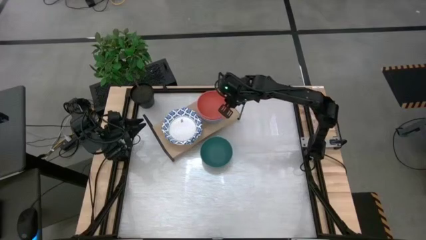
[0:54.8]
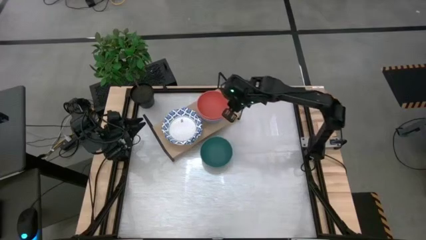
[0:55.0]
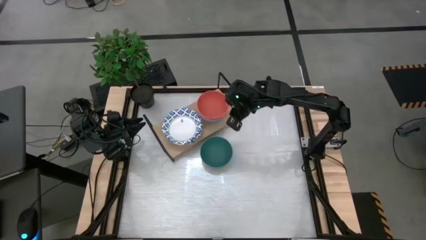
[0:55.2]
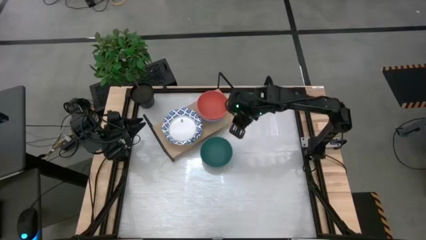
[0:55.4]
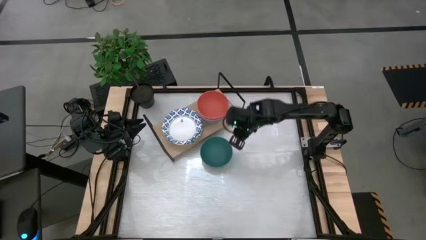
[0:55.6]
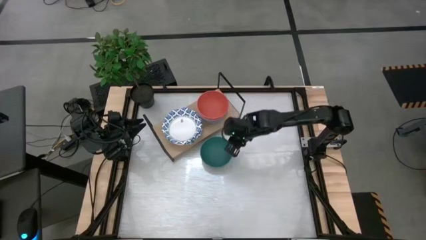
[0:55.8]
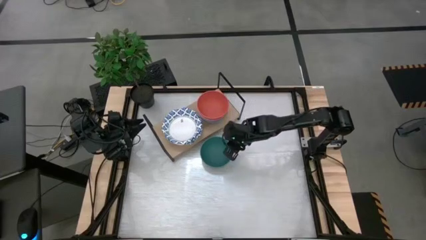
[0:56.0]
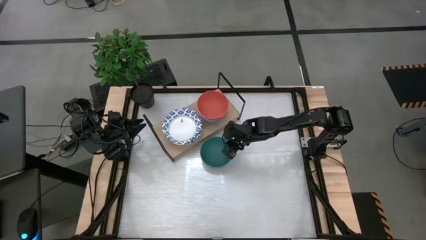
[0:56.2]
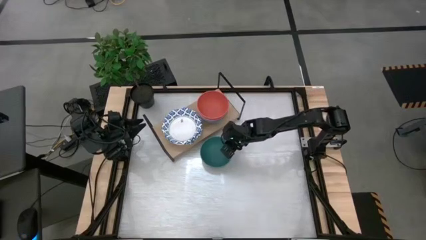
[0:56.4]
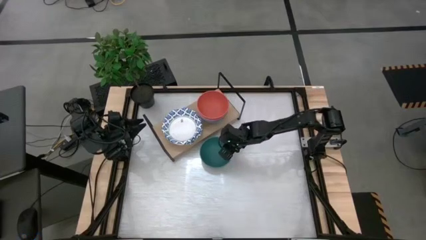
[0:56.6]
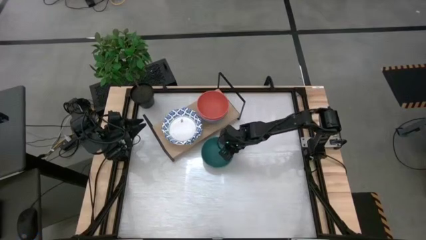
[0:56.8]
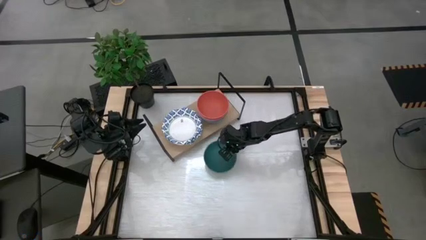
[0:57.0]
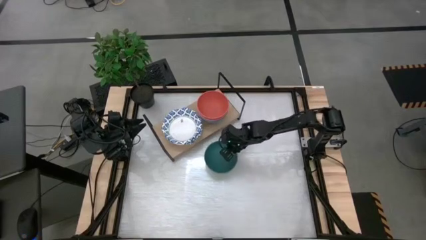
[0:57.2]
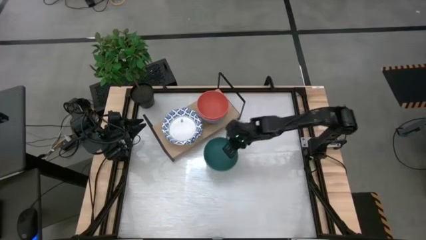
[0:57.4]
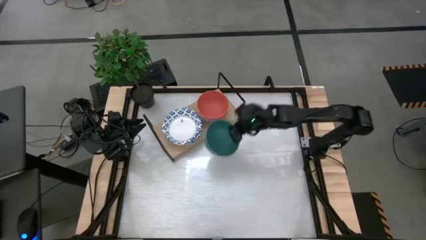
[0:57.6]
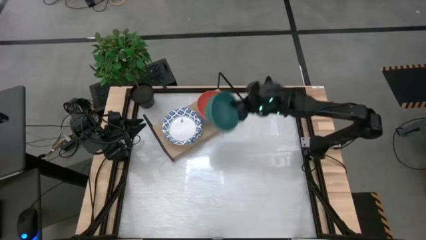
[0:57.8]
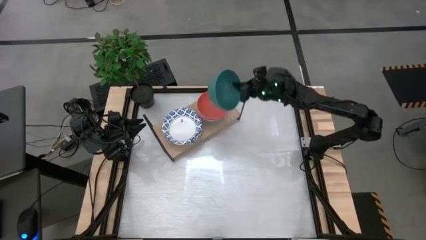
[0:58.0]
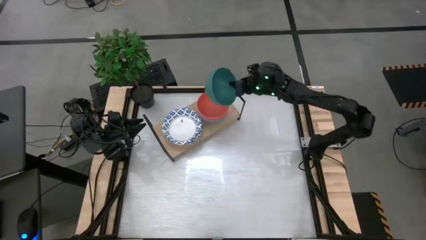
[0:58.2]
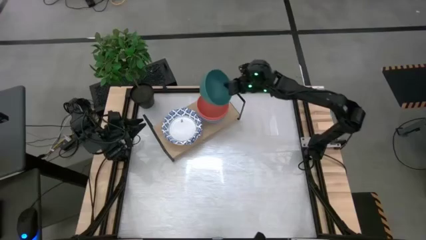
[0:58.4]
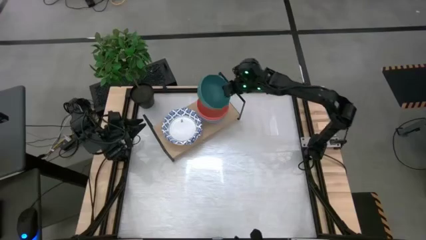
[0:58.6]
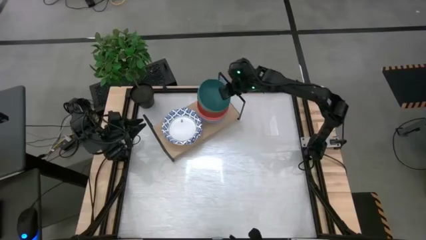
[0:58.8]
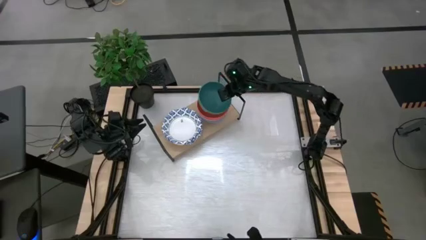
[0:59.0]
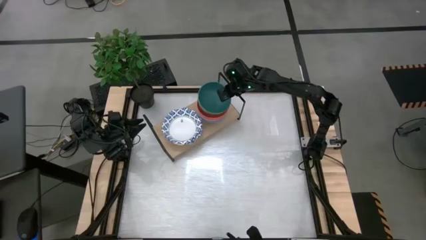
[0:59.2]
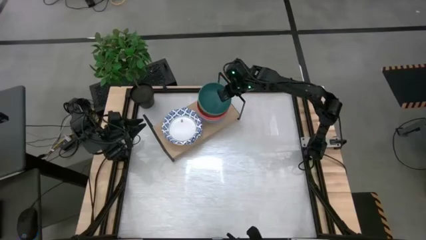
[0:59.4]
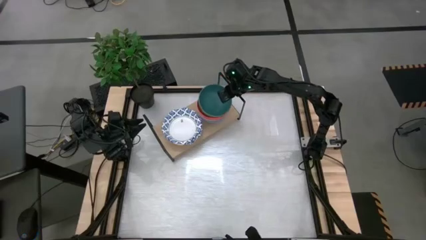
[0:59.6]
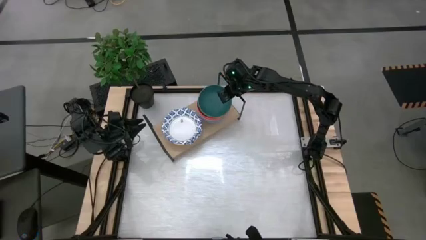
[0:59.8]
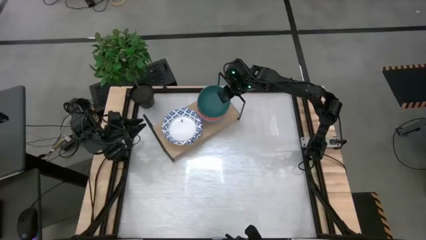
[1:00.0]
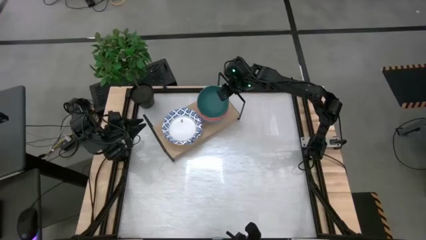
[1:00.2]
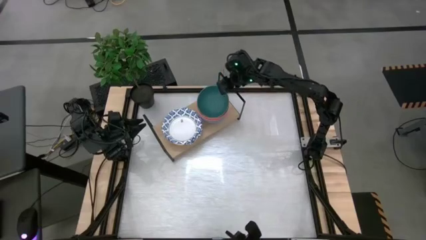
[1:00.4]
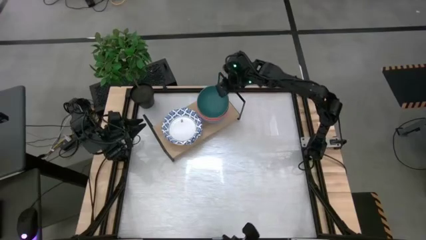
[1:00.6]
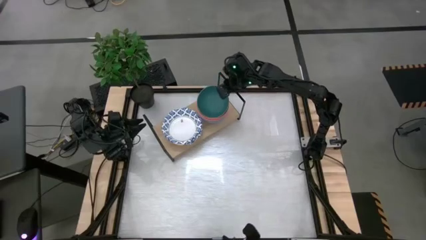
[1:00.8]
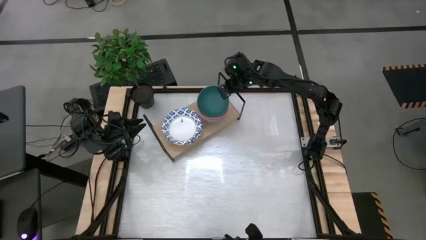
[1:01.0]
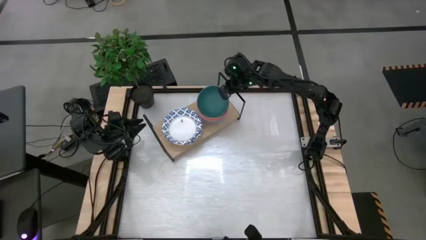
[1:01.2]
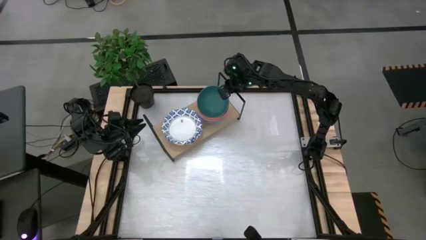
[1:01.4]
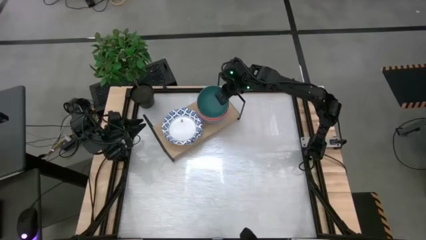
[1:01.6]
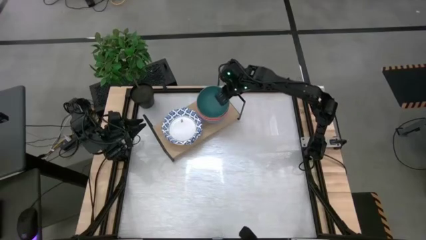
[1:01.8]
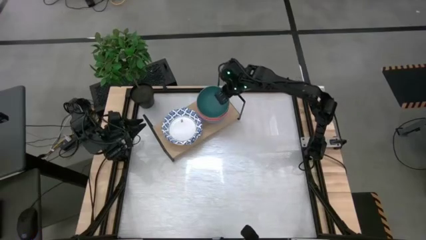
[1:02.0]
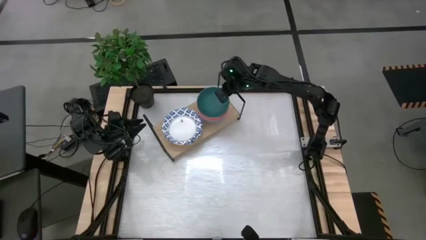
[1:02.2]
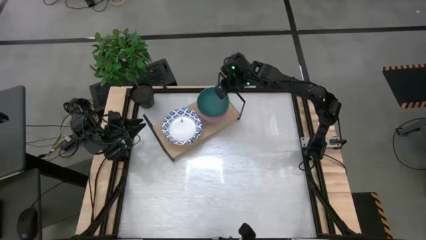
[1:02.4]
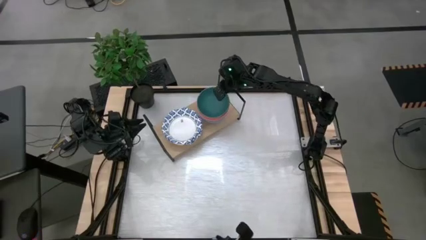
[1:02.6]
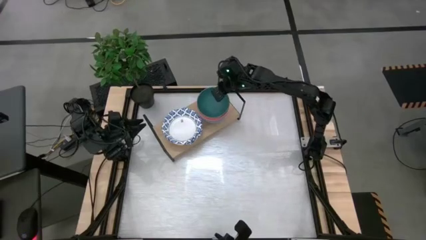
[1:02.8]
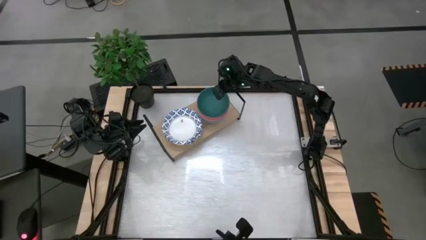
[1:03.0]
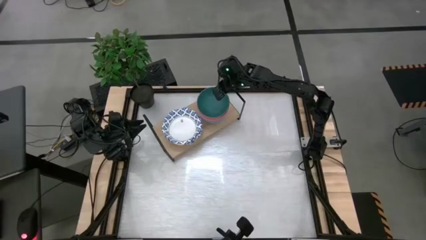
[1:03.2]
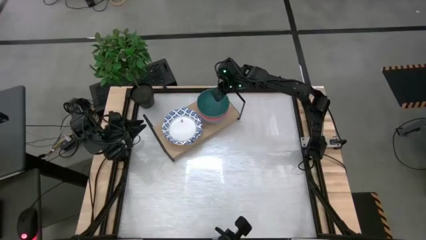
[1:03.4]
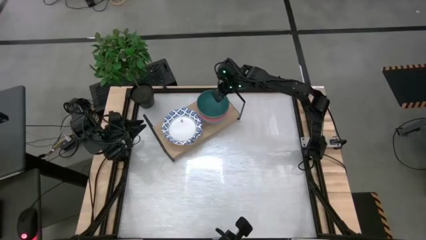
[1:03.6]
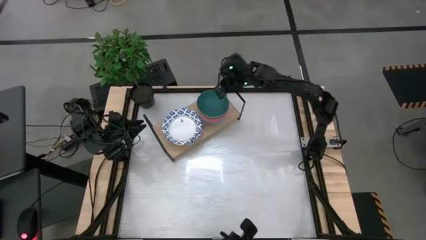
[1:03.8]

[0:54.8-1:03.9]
Task: Place and stack bowls onto a shelf
Stack the green bowl on top of the orange bowl on the shelf

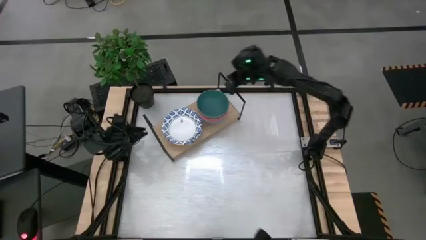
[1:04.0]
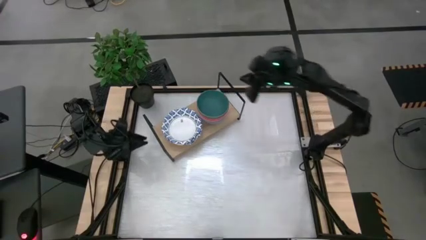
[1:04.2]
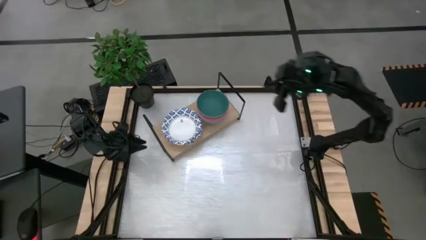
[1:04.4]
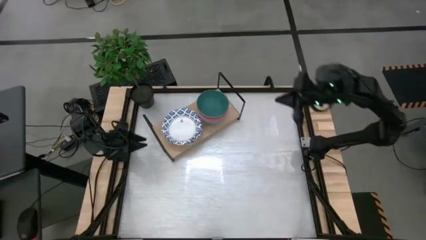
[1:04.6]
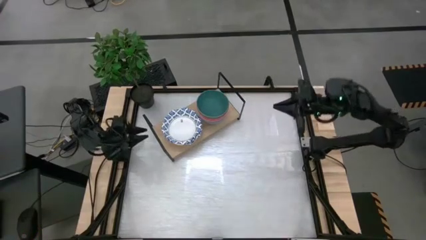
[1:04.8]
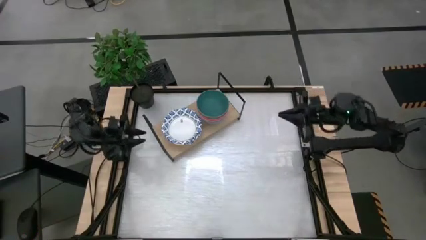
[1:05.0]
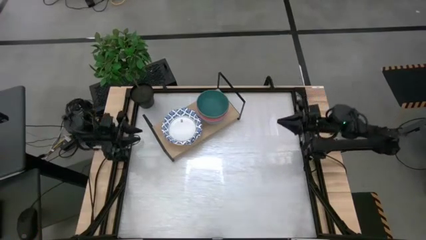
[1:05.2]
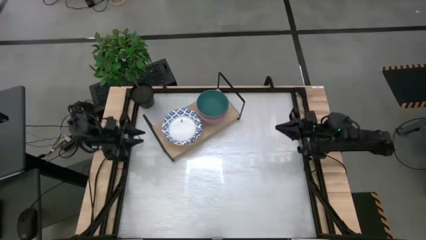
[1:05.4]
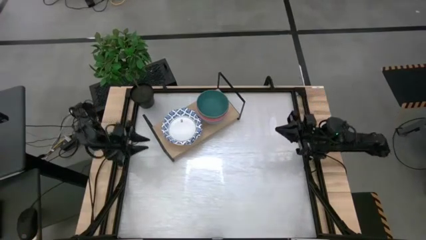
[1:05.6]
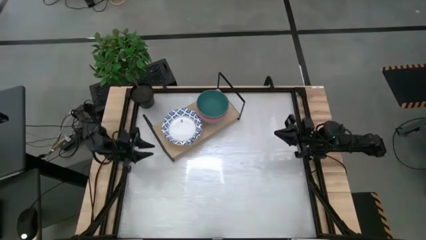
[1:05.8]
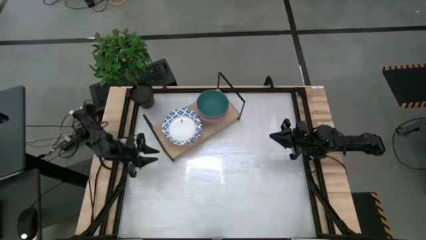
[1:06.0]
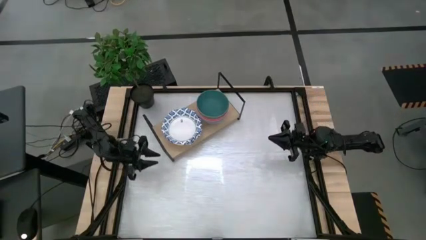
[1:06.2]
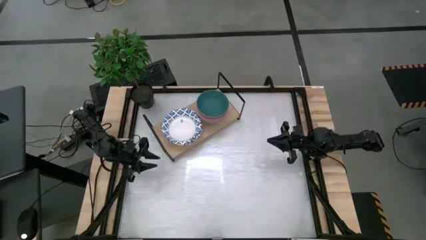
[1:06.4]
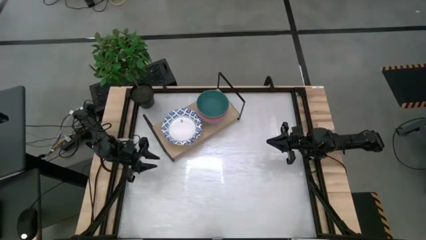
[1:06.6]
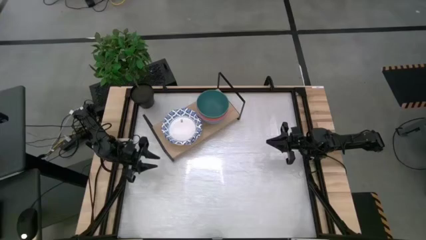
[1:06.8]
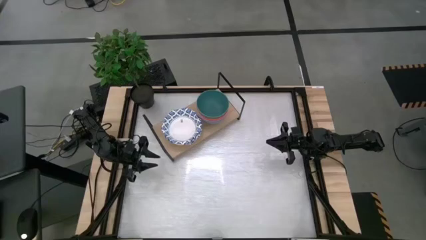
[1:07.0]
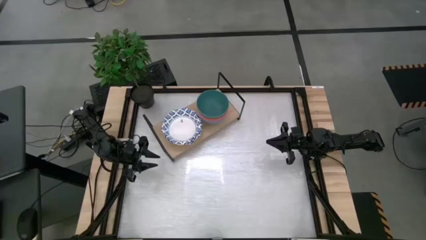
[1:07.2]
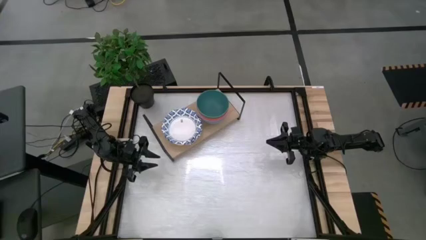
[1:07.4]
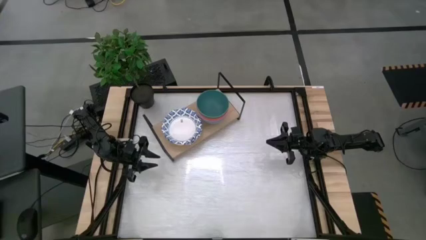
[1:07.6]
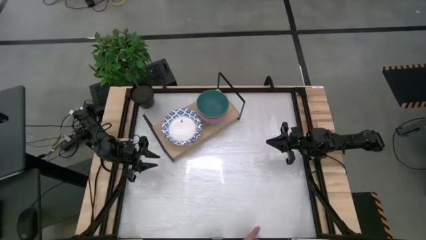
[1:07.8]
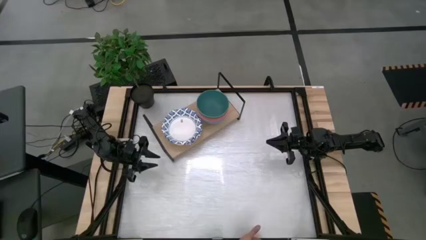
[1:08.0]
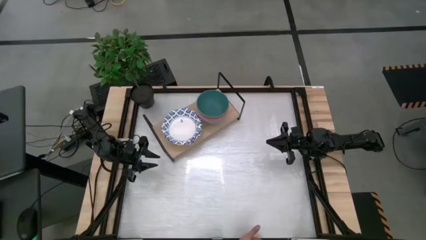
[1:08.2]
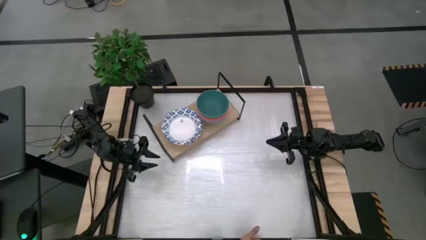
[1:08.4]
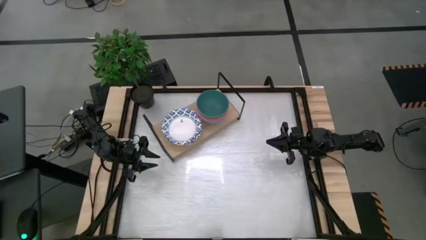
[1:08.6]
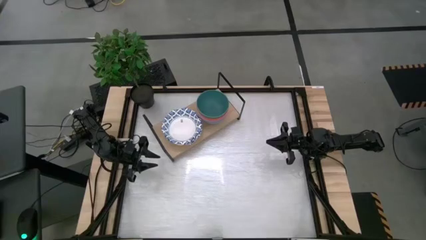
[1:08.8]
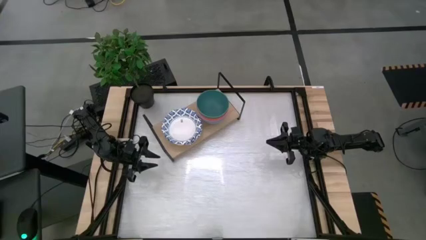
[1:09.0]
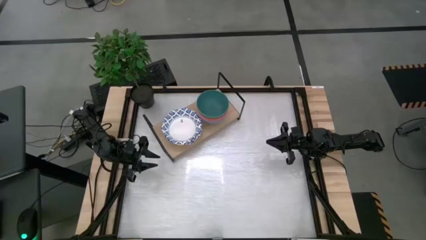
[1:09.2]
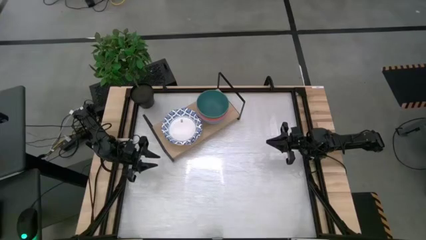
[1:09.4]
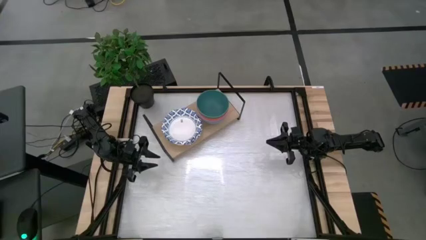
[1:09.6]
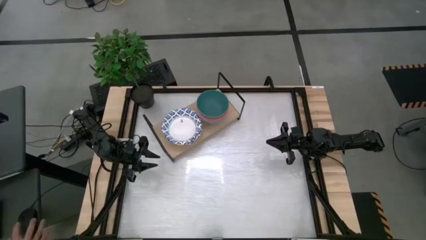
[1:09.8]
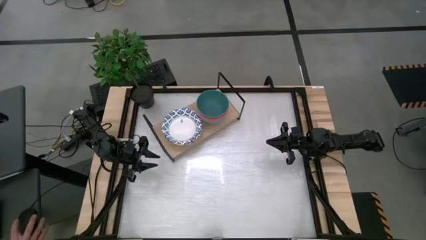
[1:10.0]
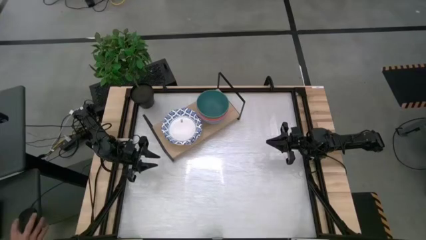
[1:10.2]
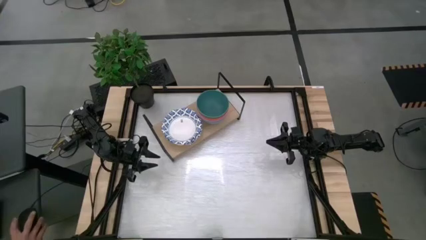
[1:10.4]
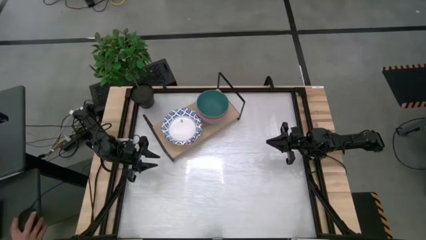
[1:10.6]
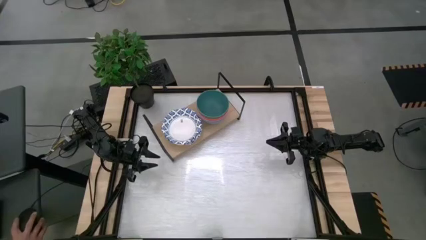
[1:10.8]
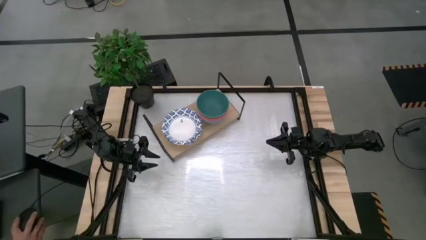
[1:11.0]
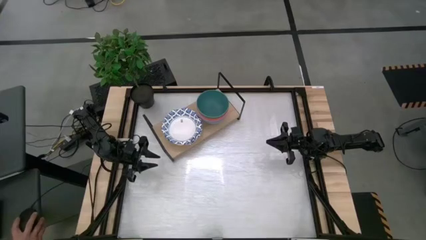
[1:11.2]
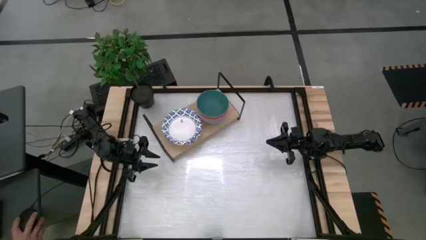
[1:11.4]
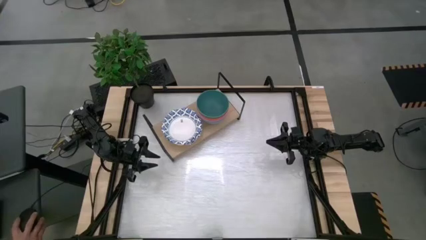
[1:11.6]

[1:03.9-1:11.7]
Return to Home Position
